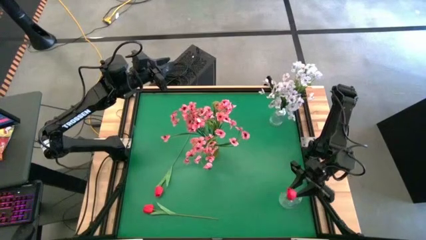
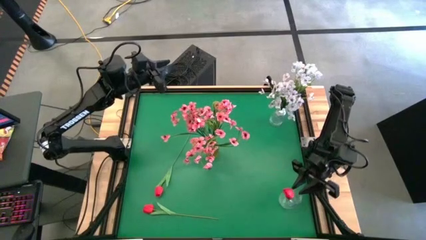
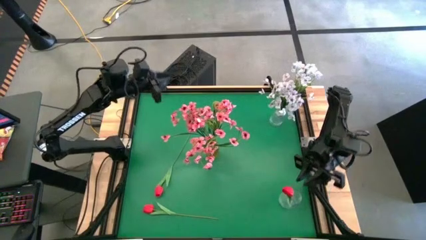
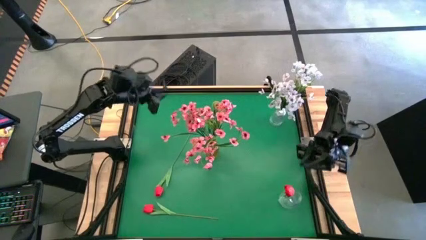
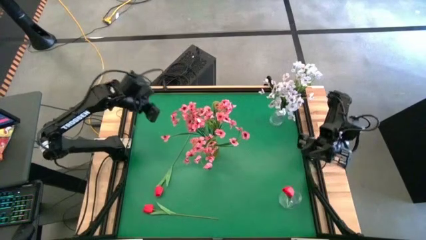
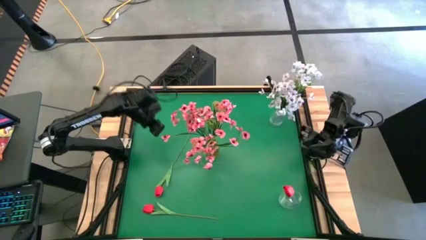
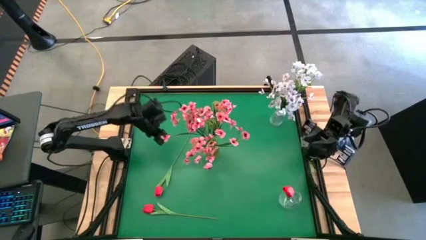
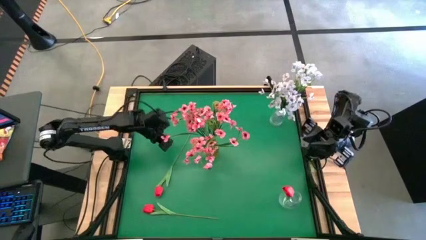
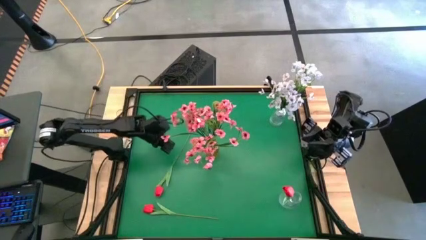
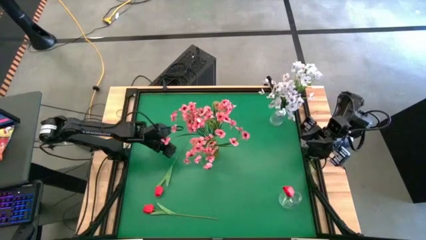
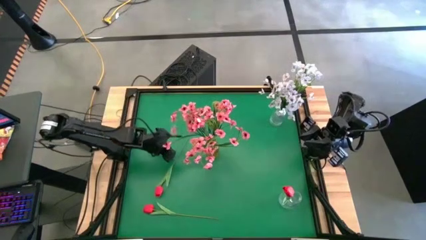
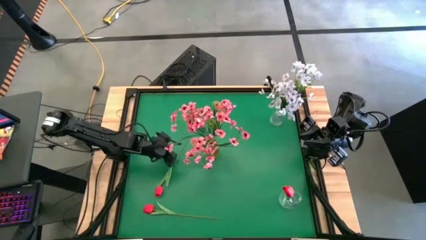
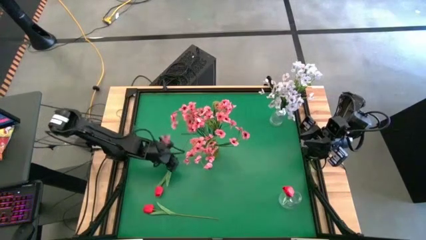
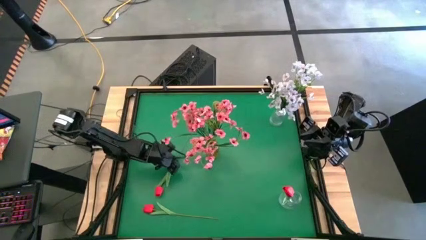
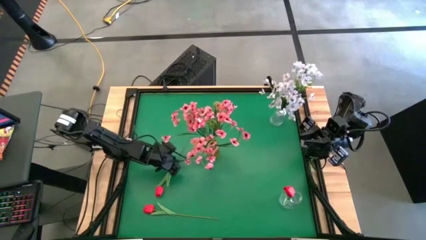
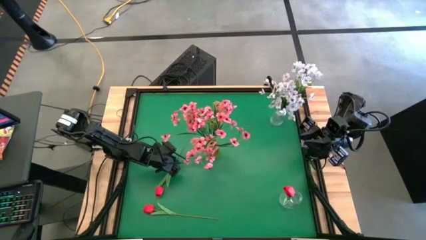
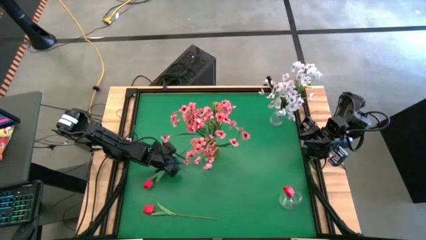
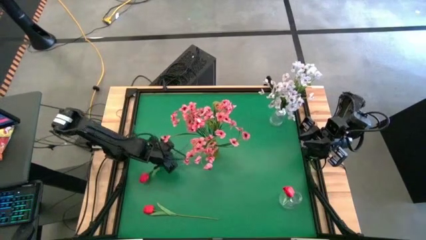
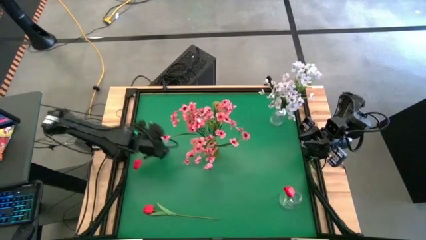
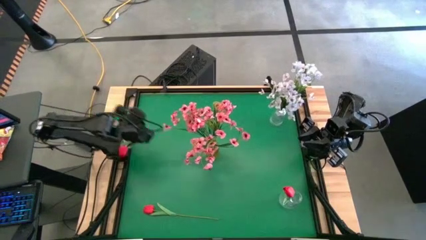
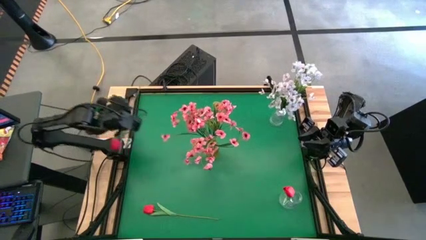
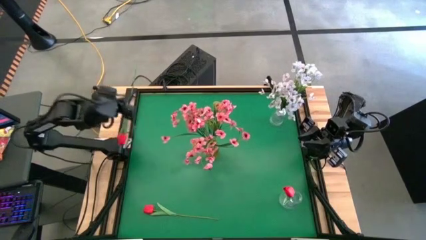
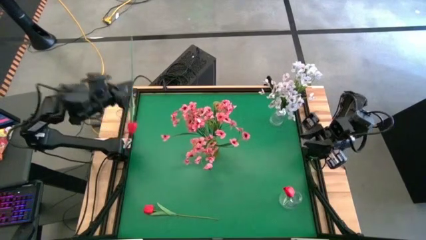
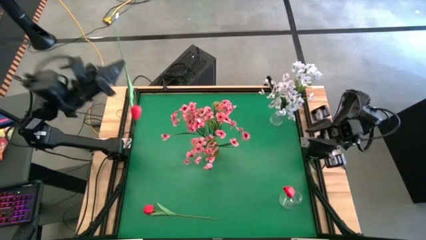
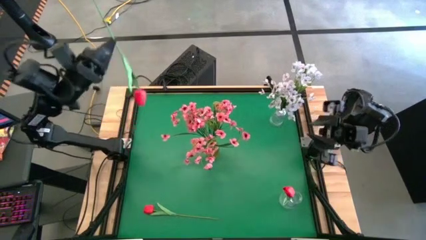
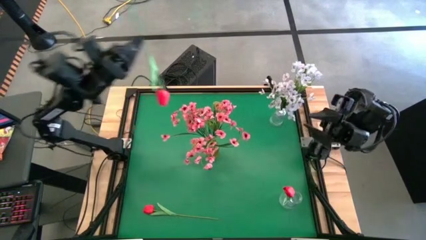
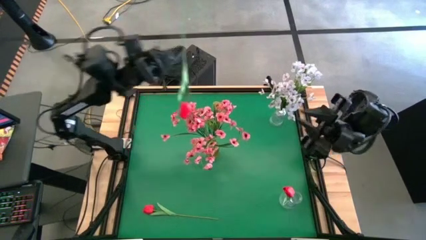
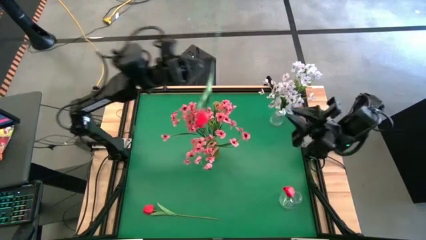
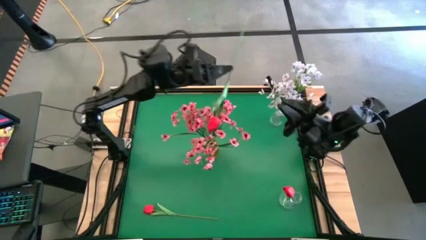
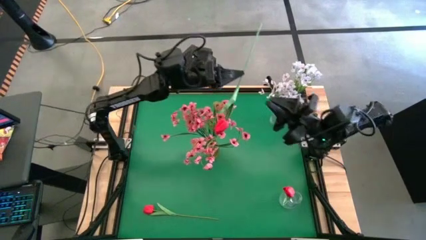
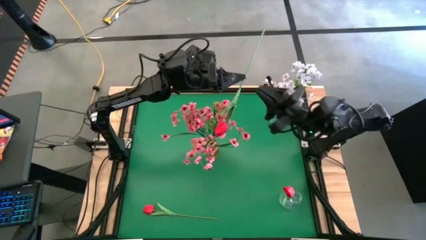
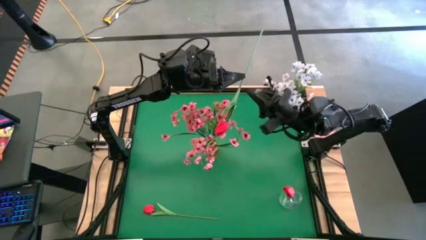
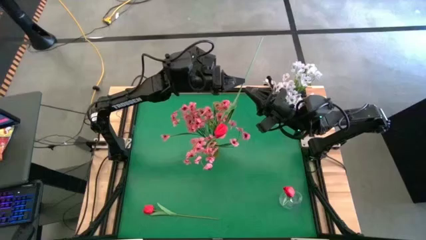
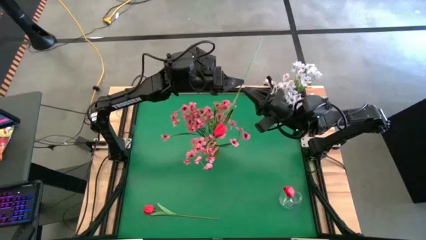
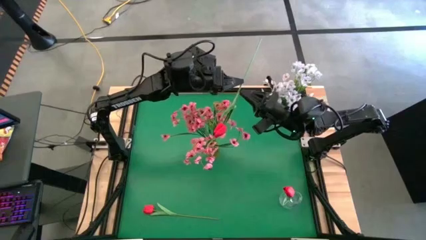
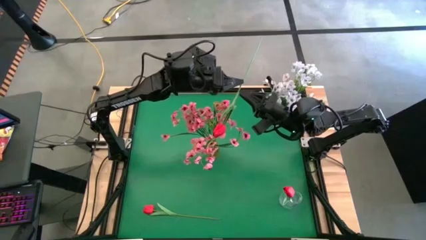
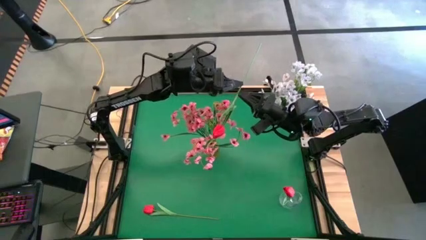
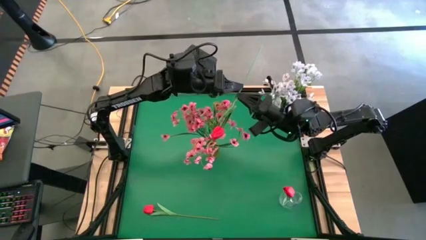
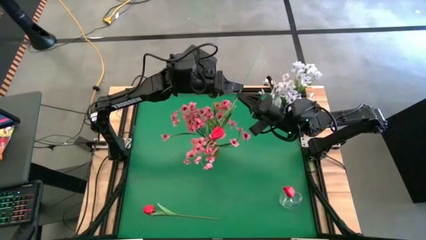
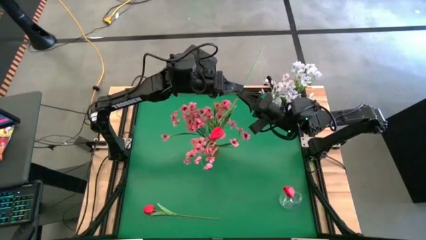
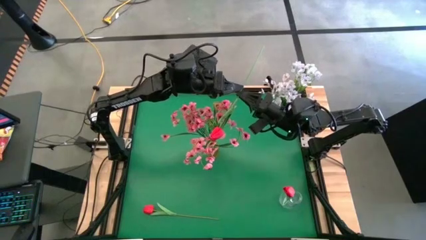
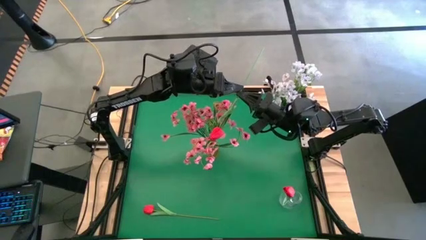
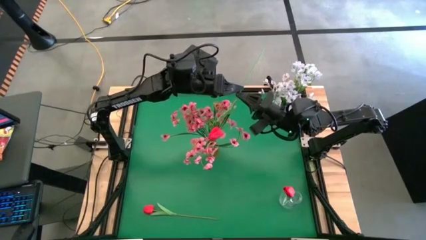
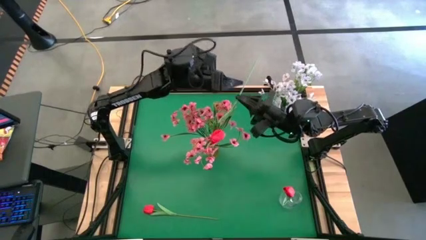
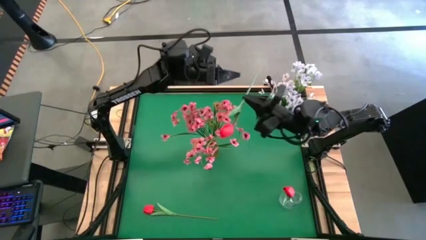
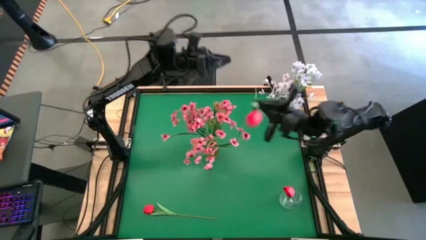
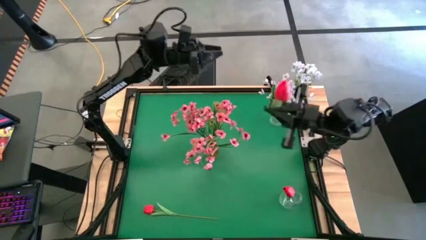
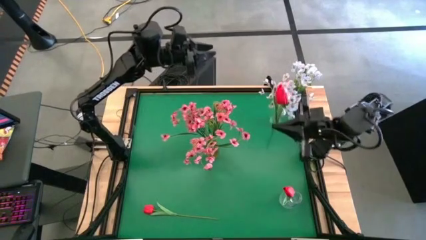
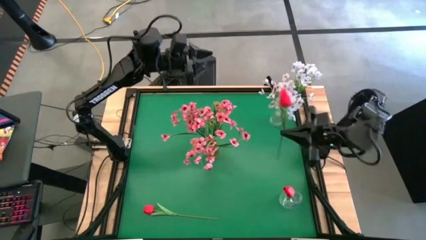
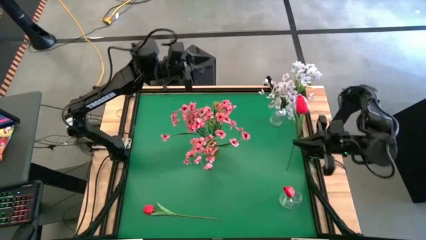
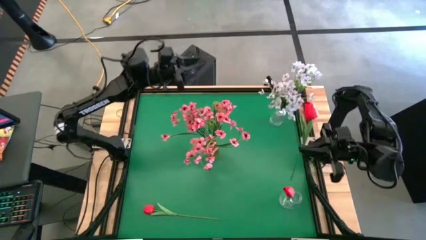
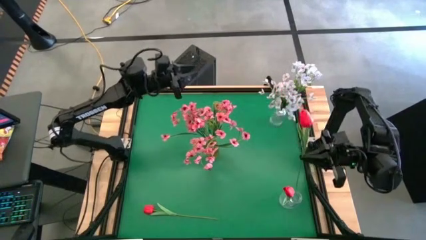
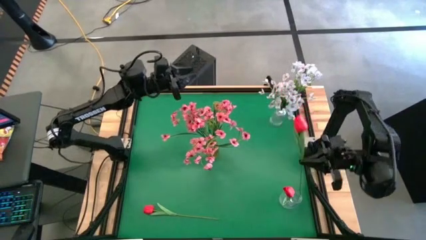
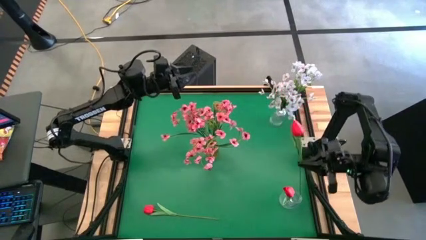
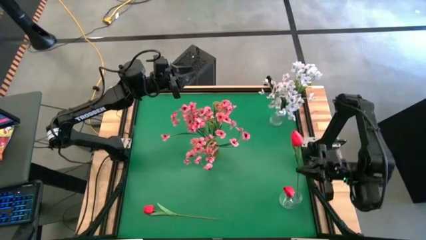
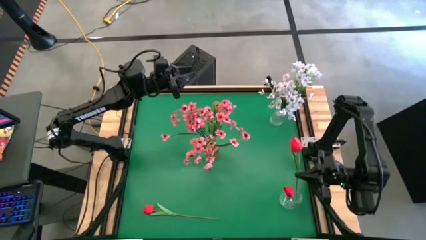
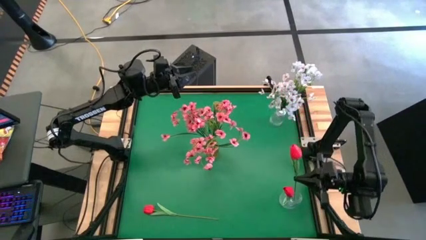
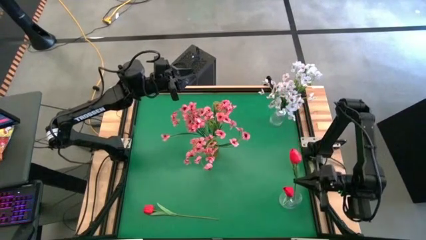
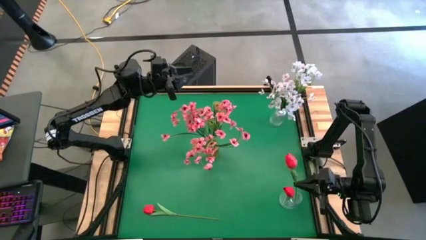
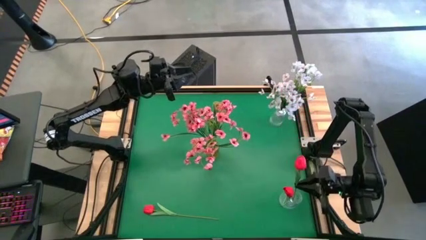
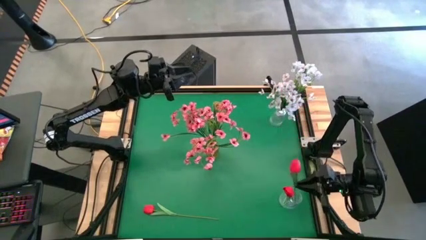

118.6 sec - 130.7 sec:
Task: Sort flowers into vase by color
Put the red flower into the bottom transparent vase

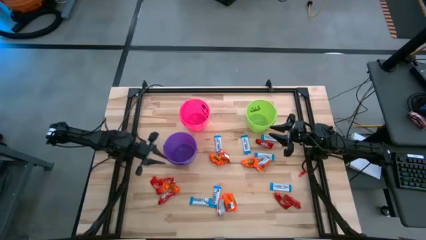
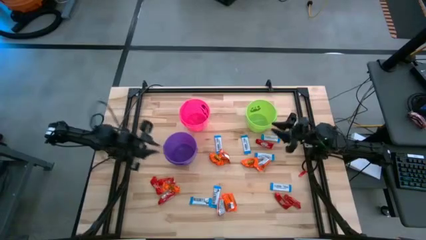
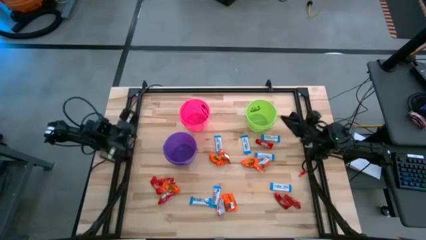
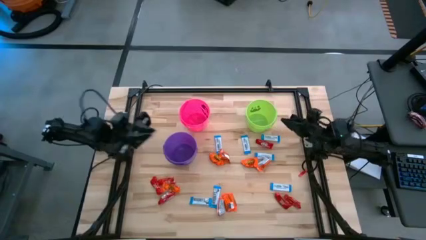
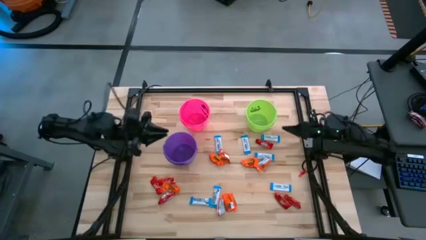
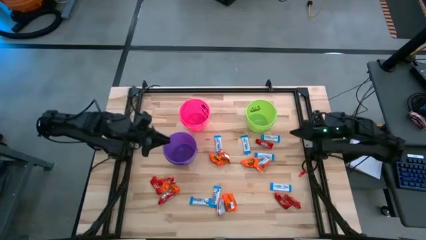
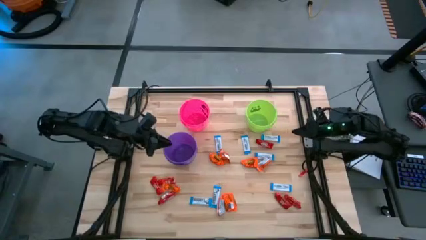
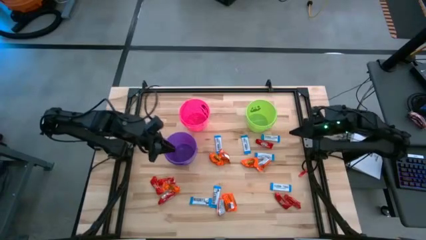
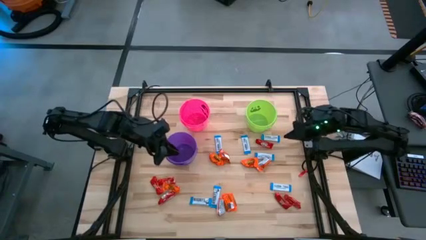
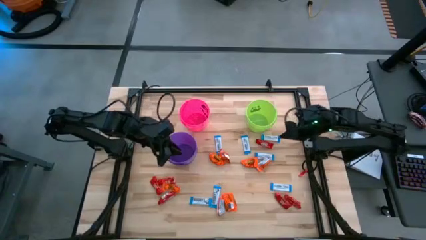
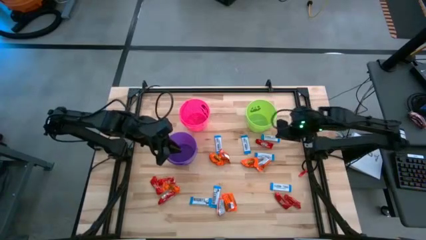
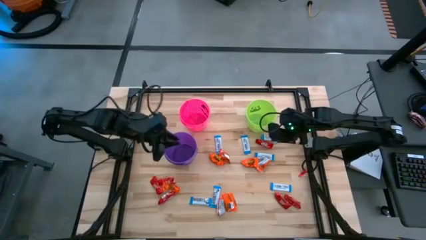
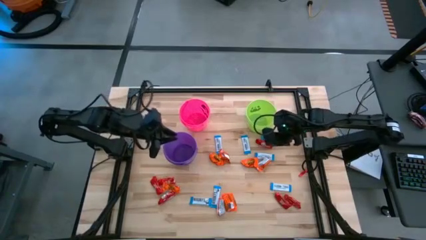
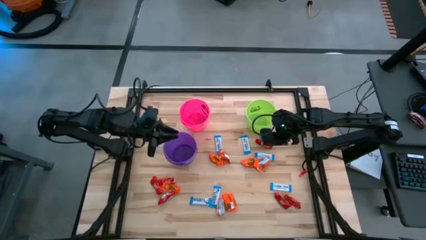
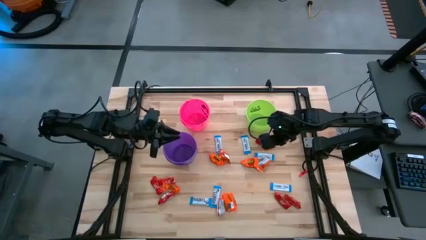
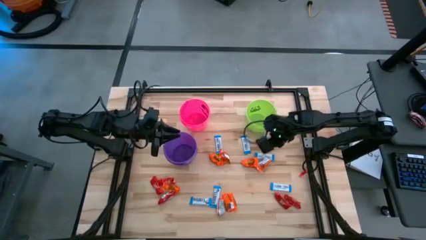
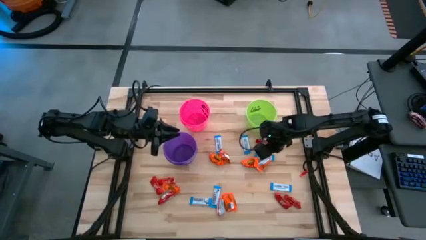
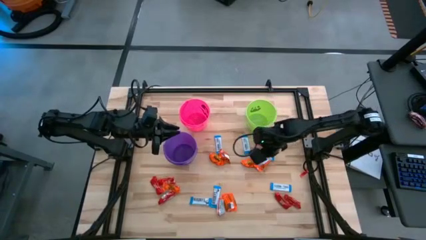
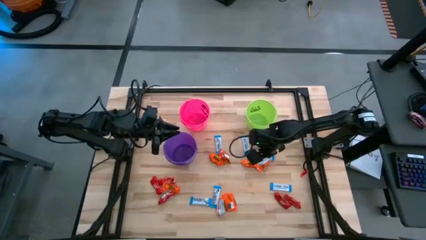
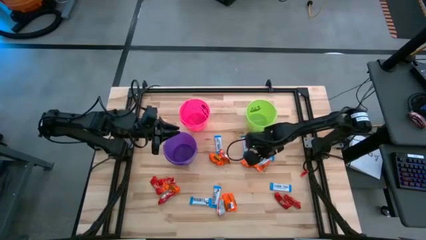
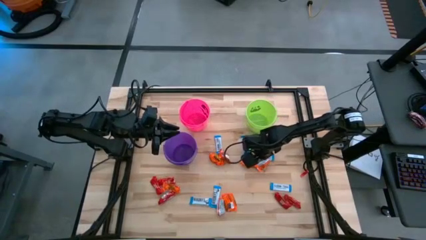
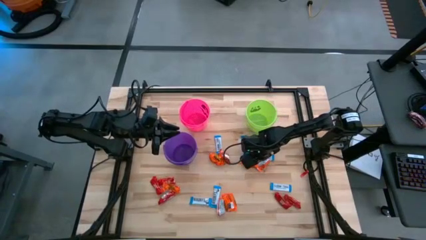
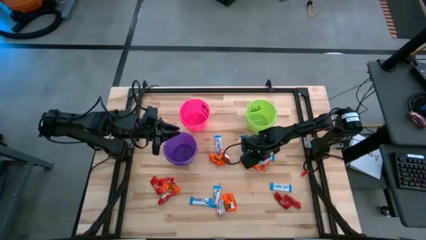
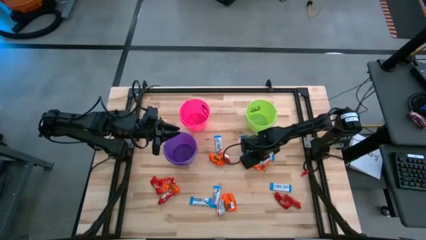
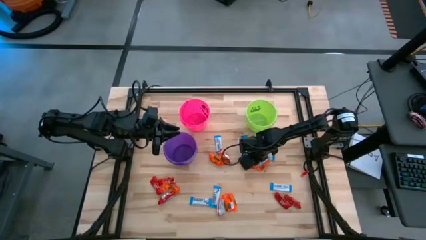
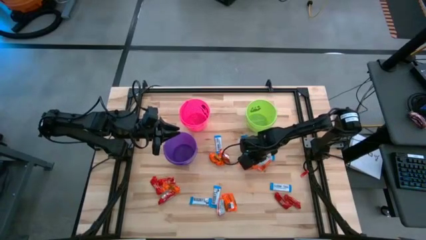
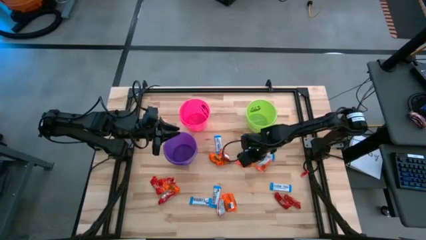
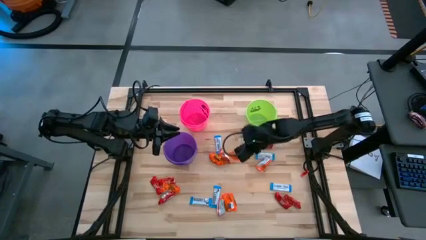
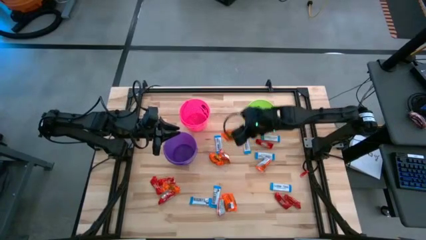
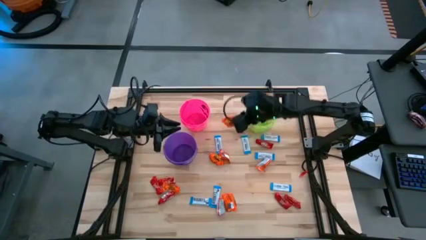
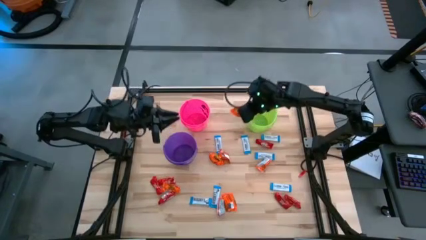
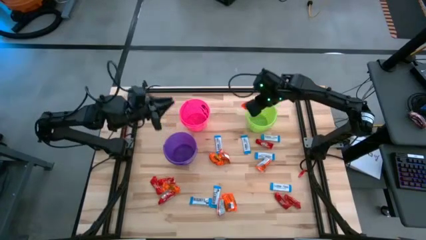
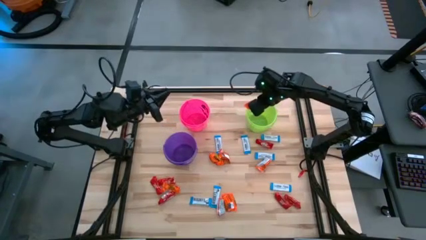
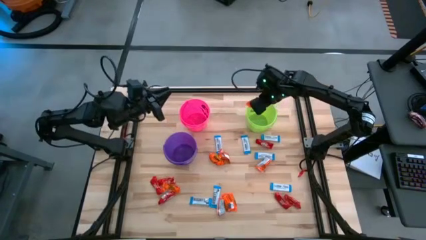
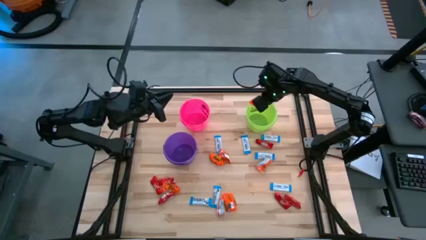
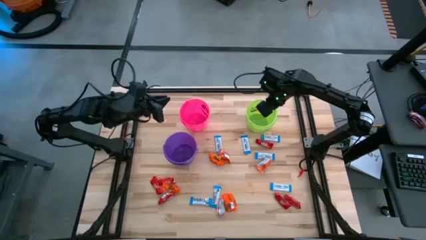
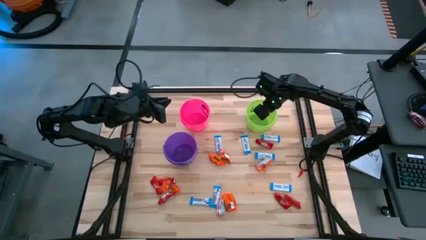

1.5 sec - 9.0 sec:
Task: Sort candy
Put the orange chocolate into the green bucket
